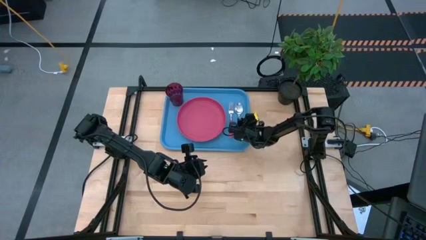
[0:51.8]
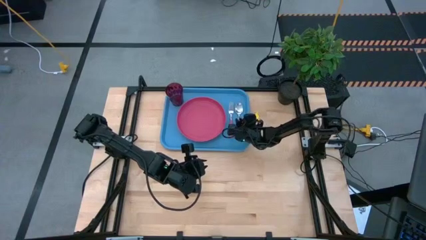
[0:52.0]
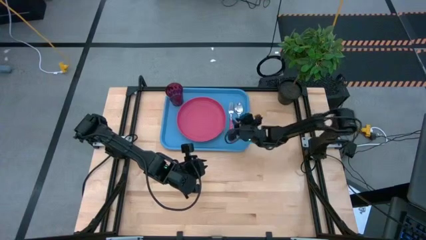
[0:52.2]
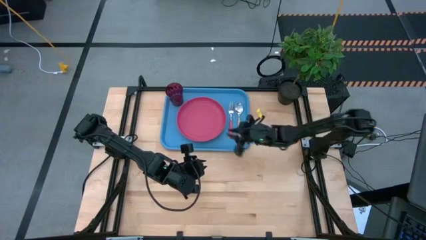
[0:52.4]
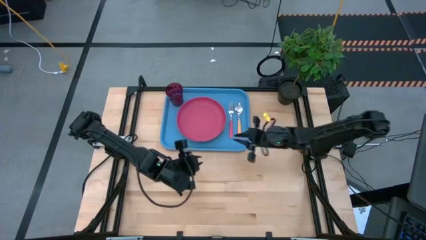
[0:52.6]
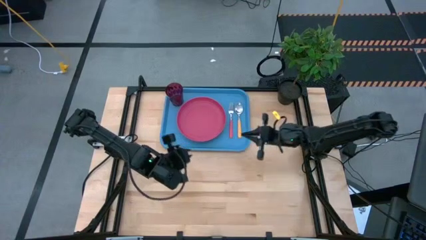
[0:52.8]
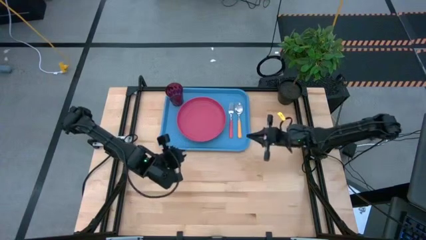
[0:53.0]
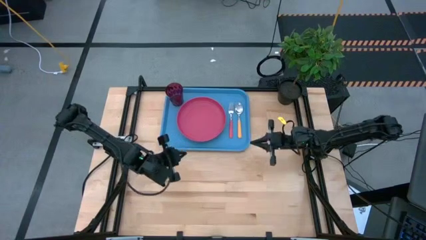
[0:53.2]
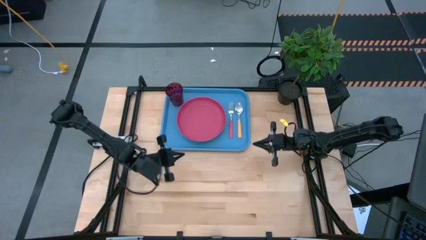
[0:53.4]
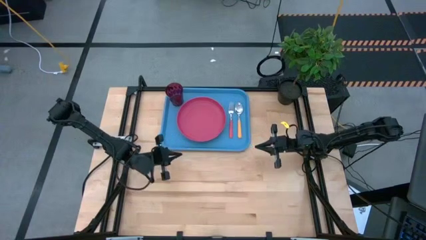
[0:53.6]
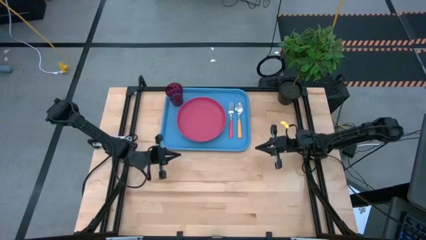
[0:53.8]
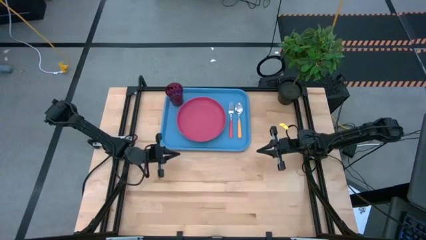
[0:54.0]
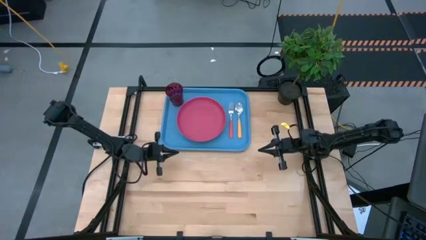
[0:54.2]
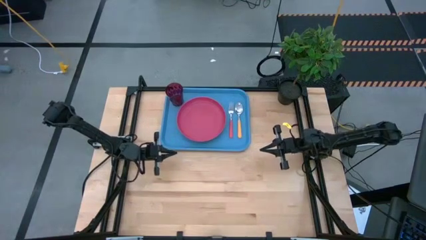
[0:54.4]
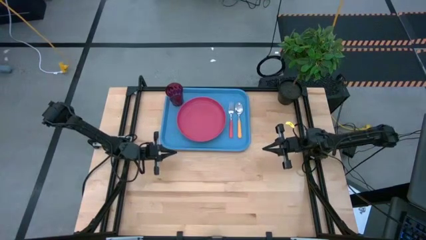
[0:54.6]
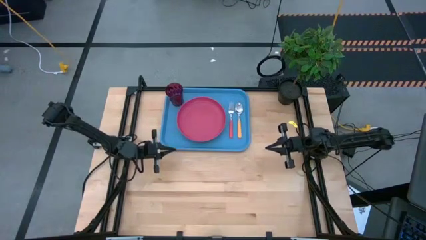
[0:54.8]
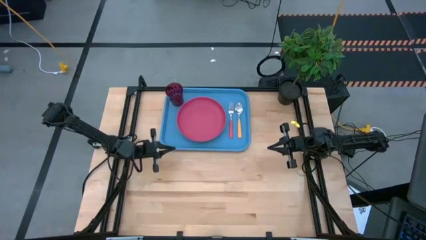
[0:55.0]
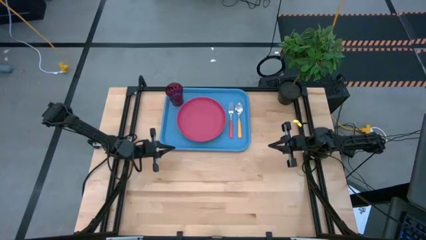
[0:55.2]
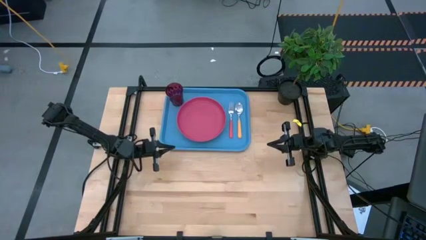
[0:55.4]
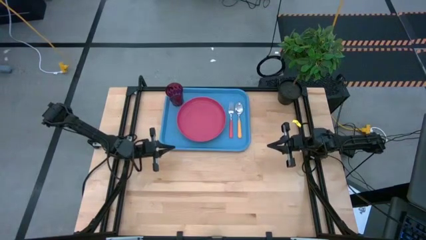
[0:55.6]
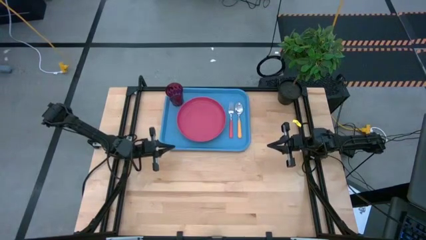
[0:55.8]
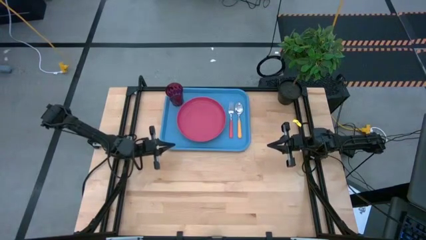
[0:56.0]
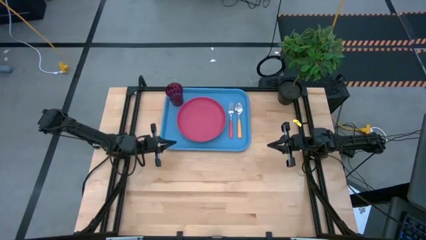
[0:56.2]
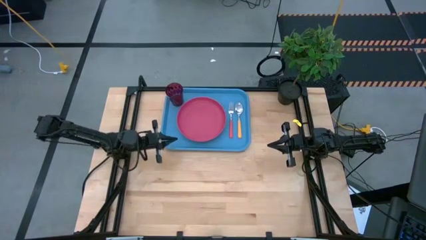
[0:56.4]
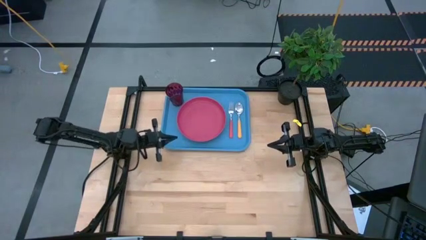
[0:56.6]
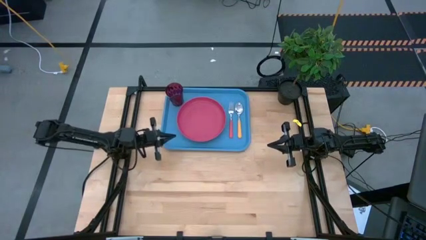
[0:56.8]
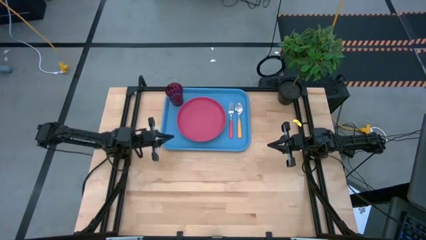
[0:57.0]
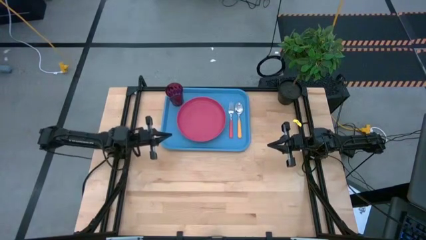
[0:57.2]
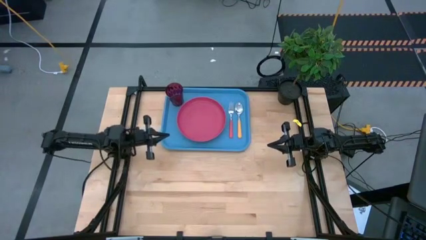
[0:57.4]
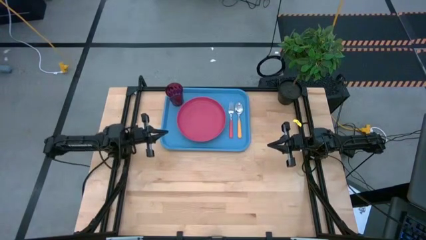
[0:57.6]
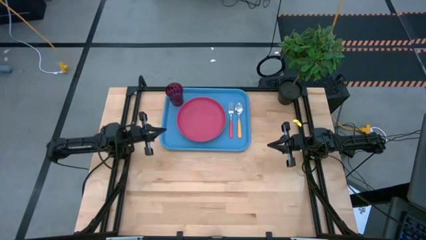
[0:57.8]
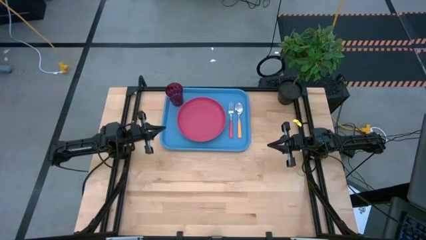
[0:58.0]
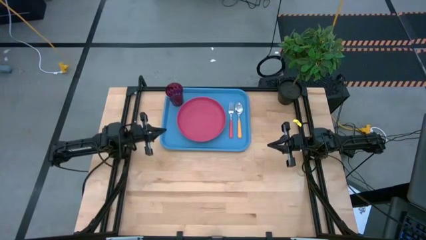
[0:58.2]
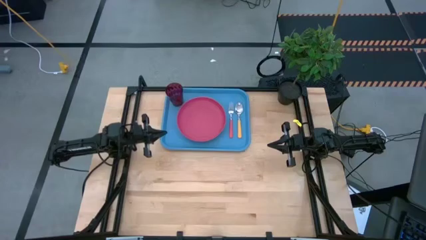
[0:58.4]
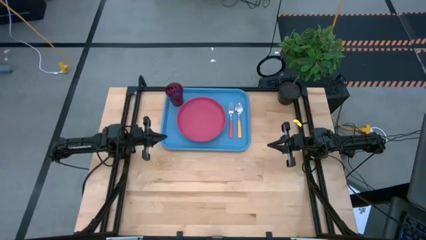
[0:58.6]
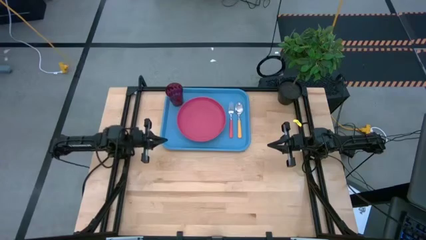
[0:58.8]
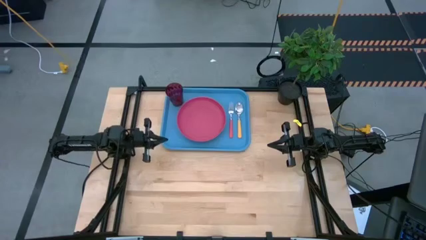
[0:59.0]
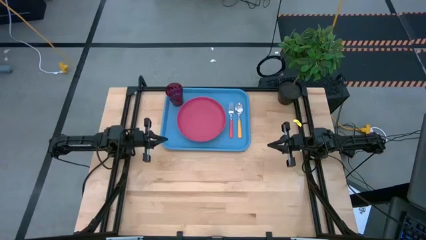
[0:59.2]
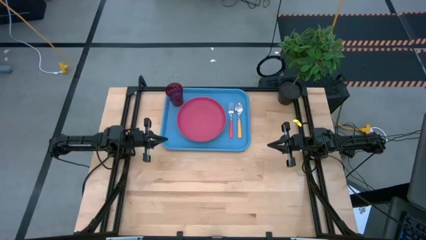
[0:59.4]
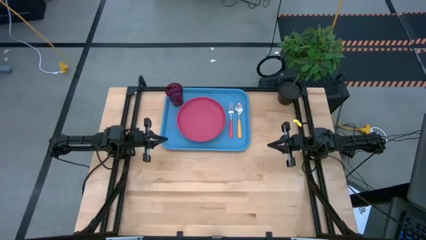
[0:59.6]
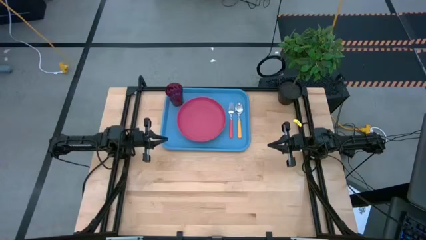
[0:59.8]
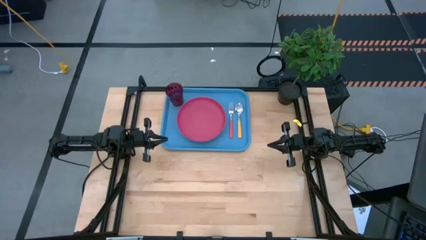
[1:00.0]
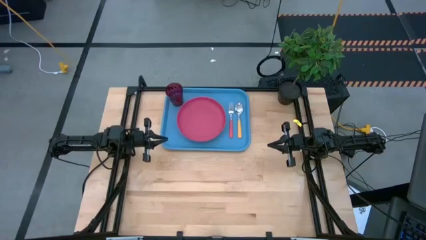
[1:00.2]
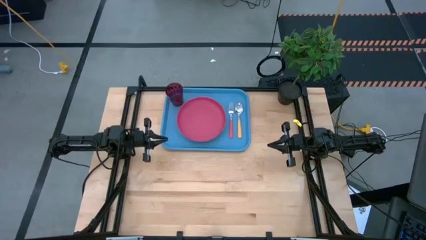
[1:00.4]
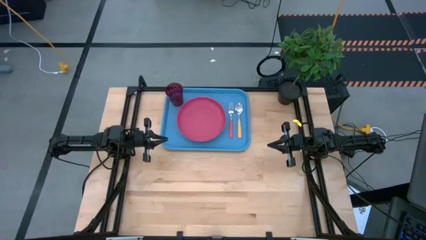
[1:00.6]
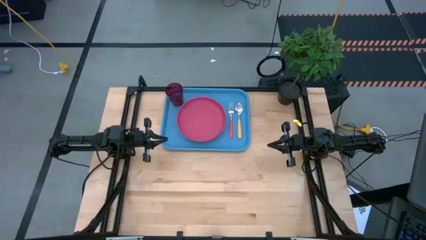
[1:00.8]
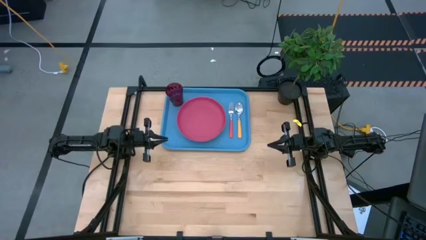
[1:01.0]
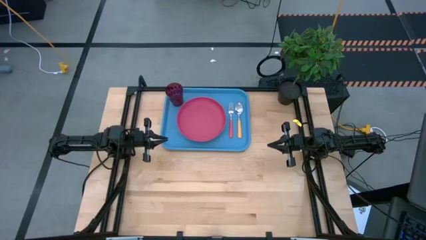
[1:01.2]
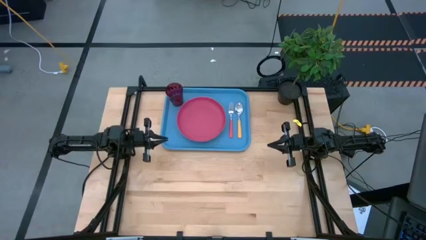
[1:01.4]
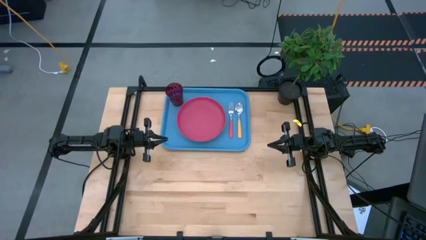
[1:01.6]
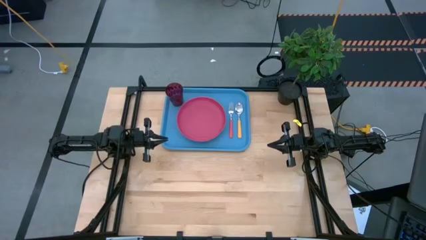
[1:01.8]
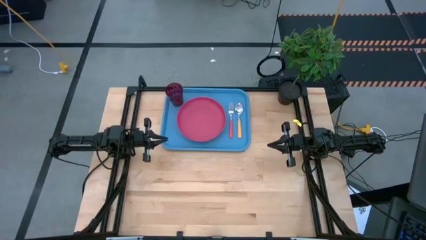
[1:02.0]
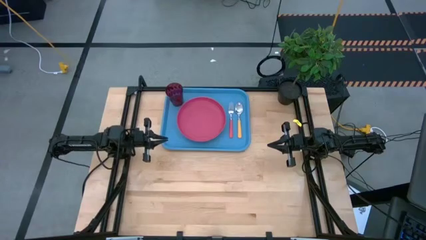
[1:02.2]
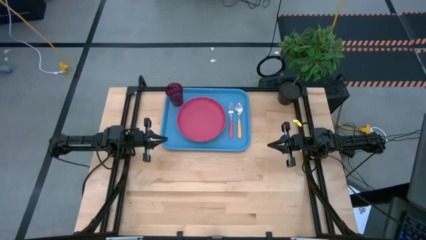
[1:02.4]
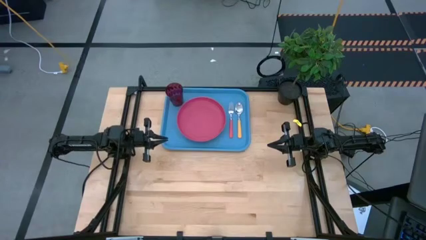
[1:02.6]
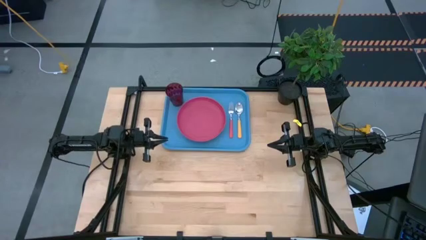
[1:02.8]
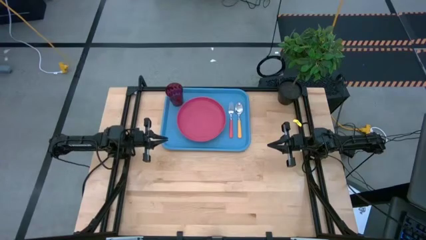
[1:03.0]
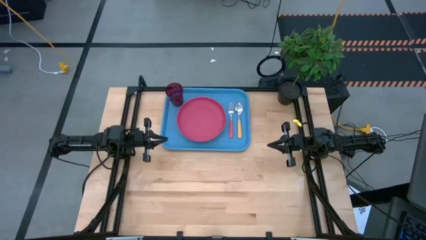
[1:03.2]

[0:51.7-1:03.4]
Task: Pick and place plate/cup/fork/spoon on tray
Return to Home Position

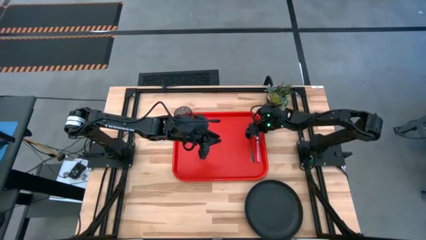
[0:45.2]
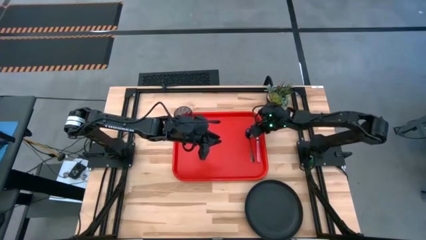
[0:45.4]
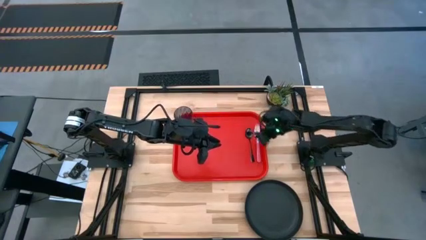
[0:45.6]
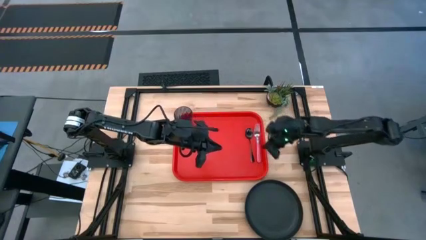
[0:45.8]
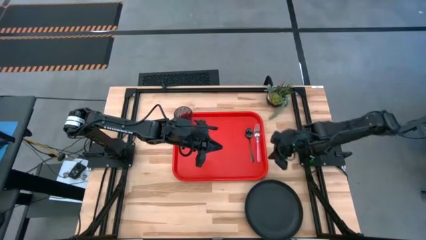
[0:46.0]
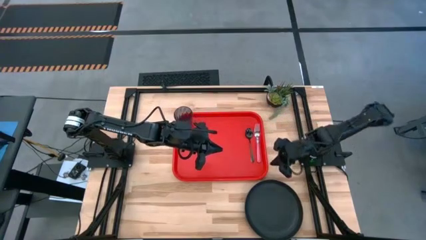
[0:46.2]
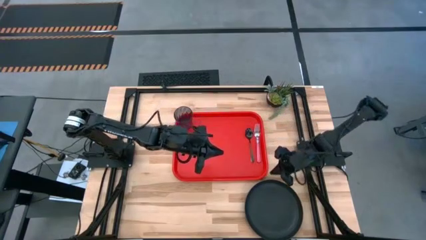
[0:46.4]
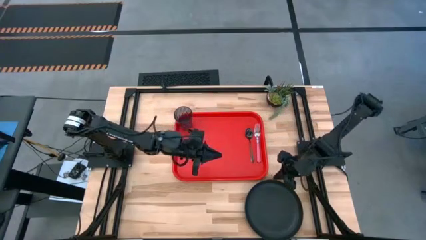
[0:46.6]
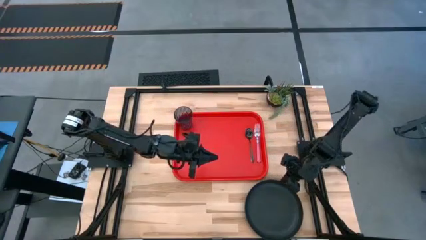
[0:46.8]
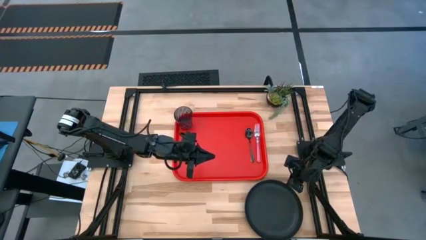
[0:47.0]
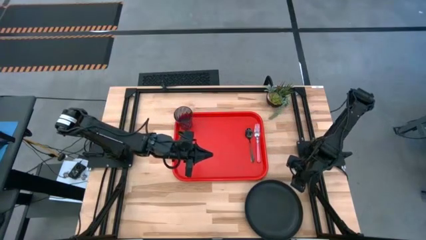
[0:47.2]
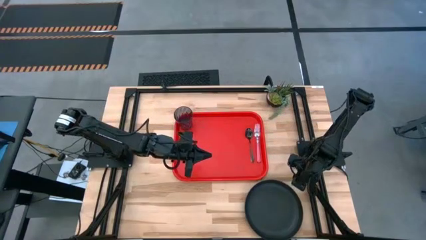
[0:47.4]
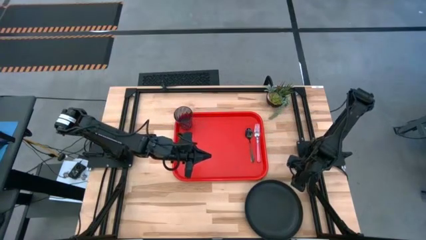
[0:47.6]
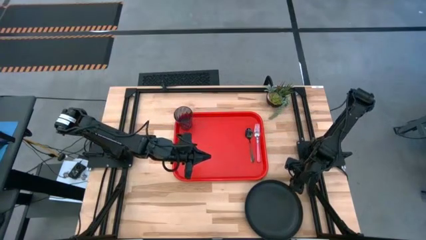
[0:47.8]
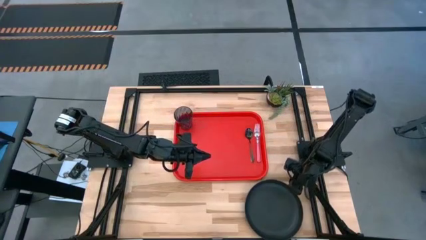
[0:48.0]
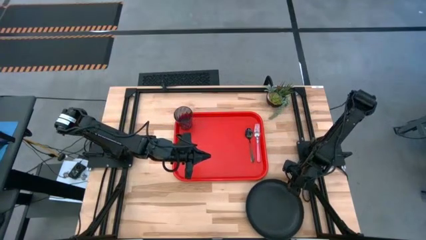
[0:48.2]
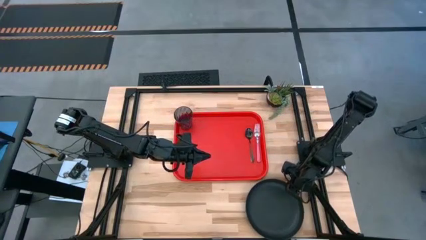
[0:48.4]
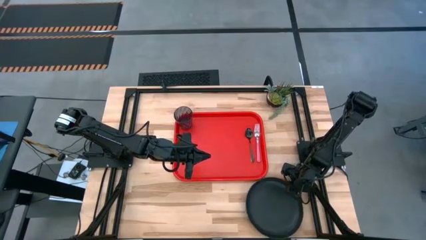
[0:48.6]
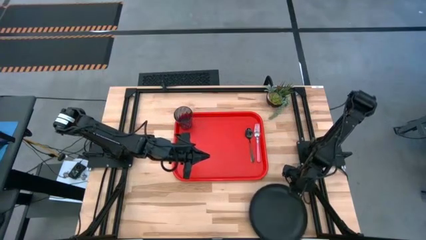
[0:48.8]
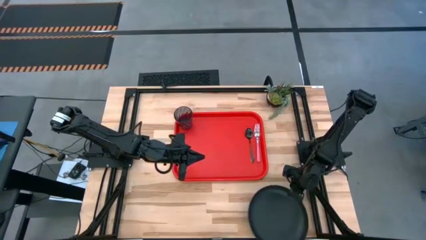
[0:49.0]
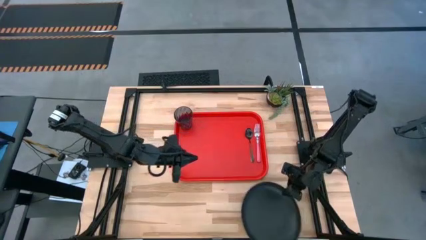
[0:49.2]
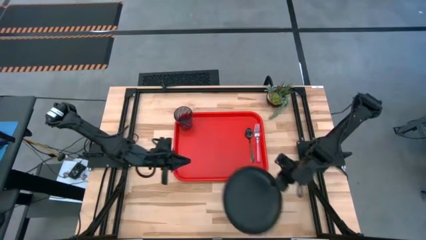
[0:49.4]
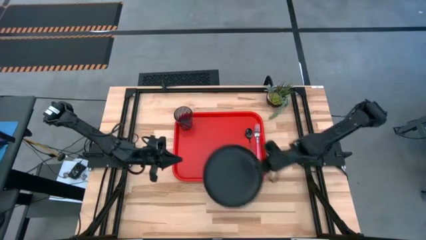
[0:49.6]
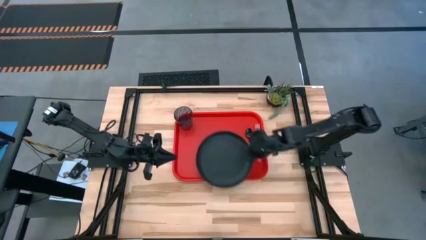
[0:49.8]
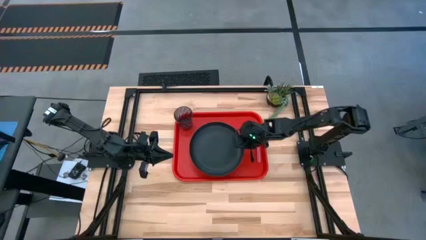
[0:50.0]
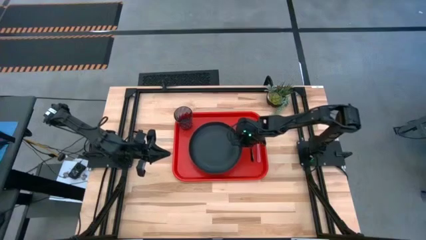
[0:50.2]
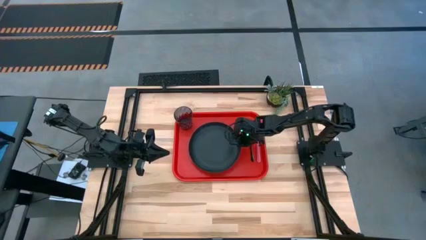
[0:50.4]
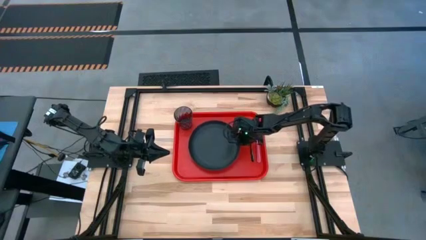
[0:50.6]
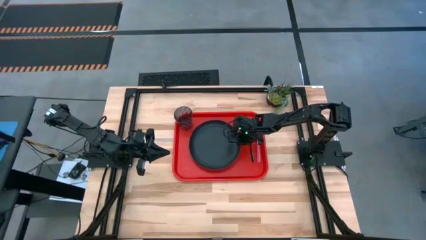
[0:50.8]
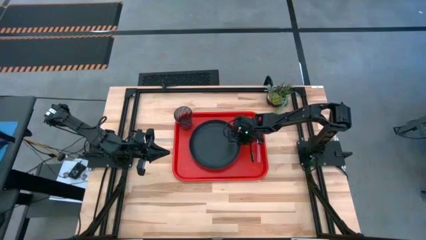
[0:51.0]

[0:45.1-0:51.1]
Task: Pick and place plate/cup/fork/spoon on tray
Put the black plate to the left of the black spoon on the red tray
